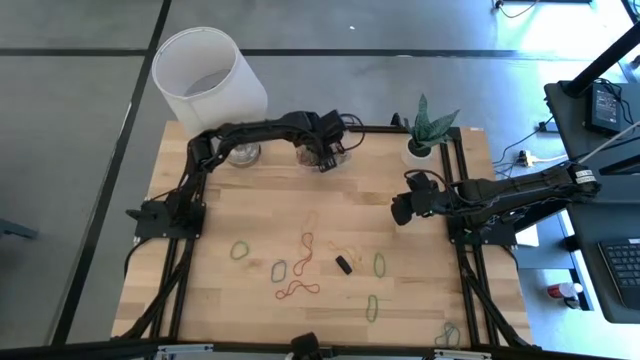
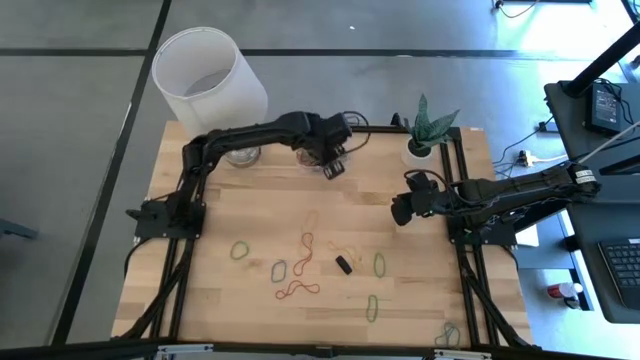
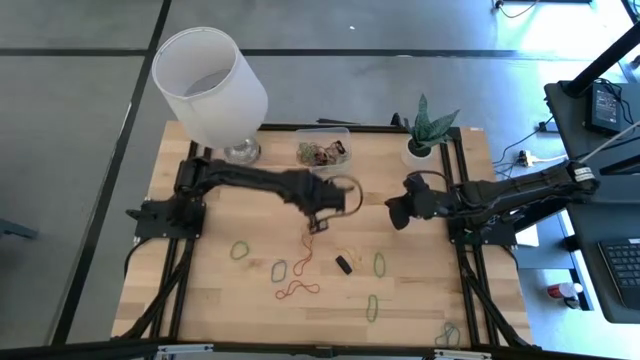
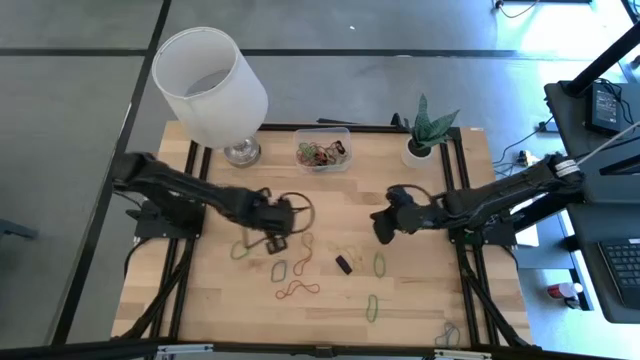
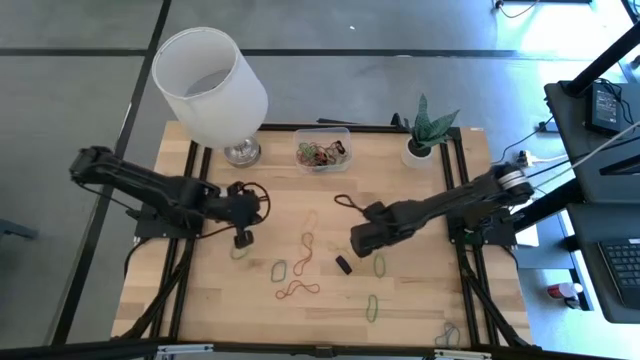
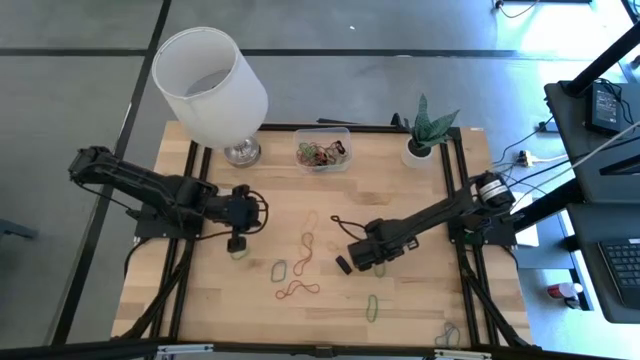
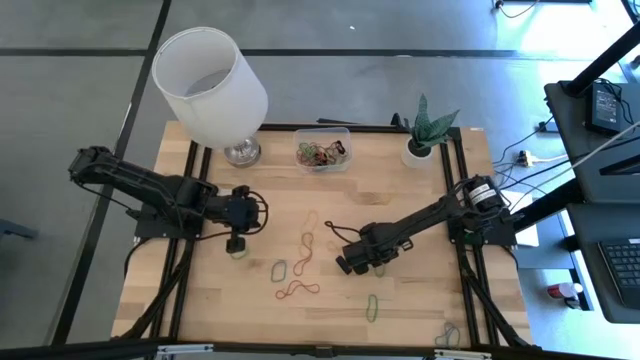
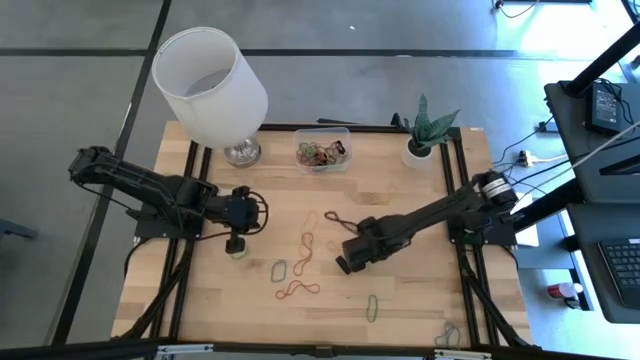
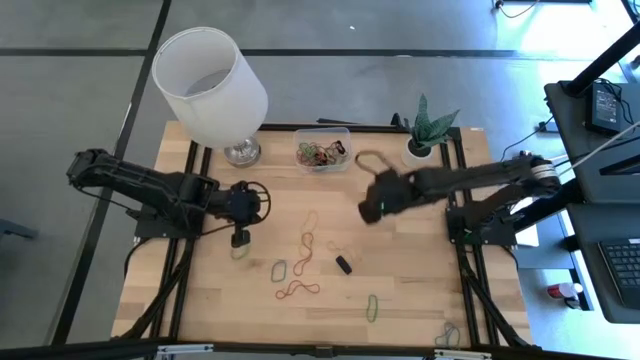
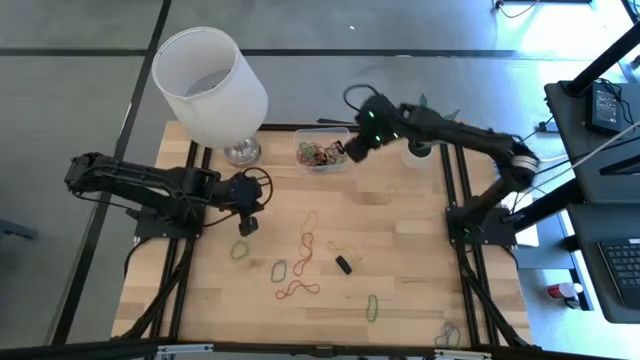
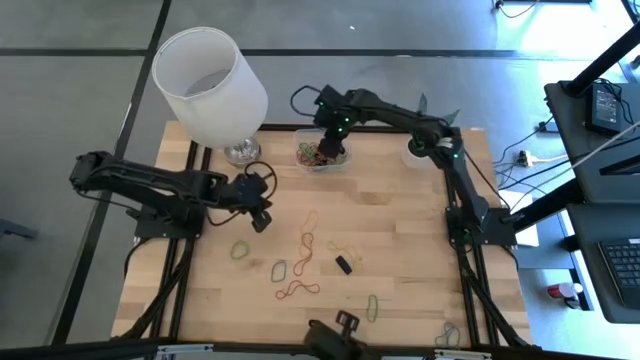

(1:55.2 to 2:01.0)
Task: Pick and place rubber bands into bin
Put the middle right green rubber band into the transparent bin

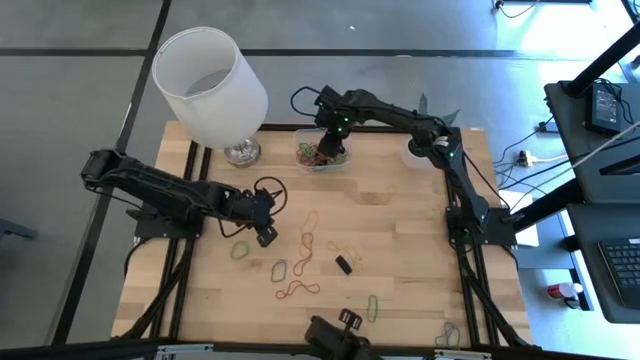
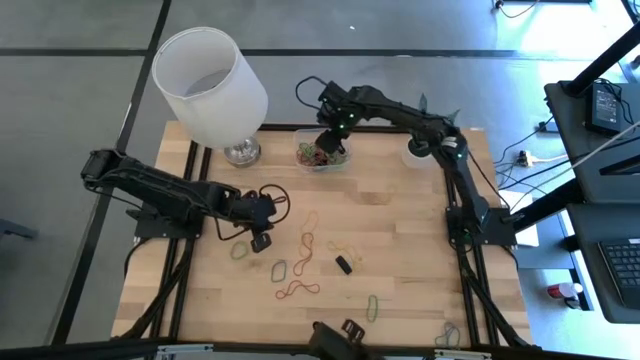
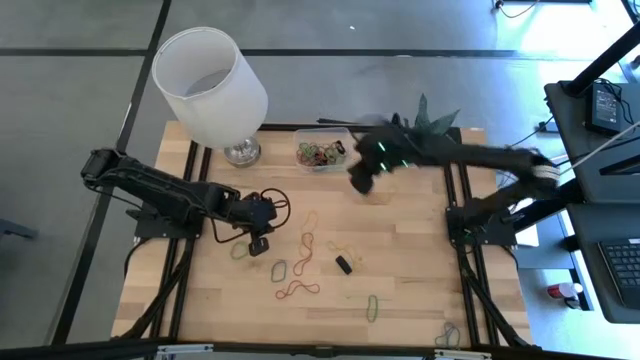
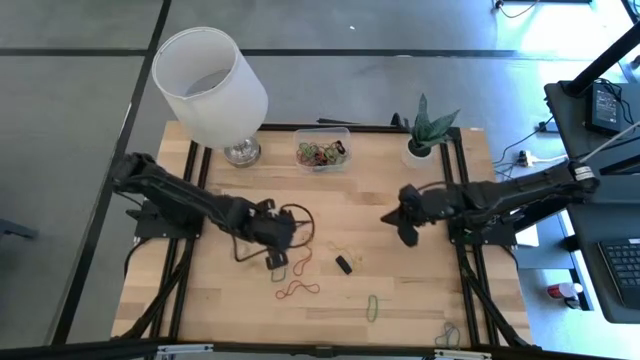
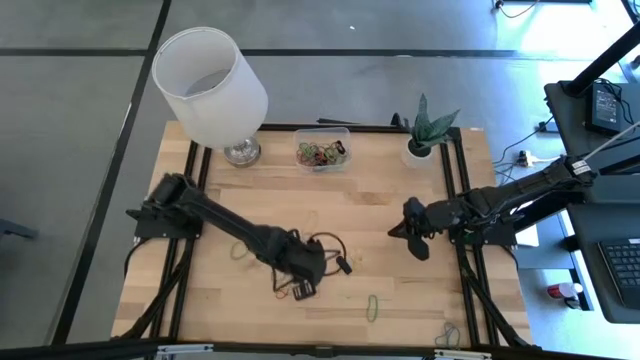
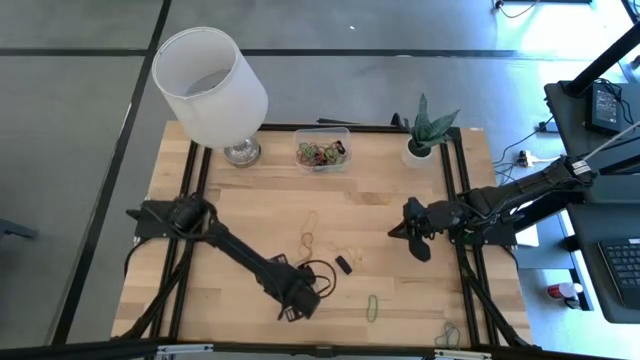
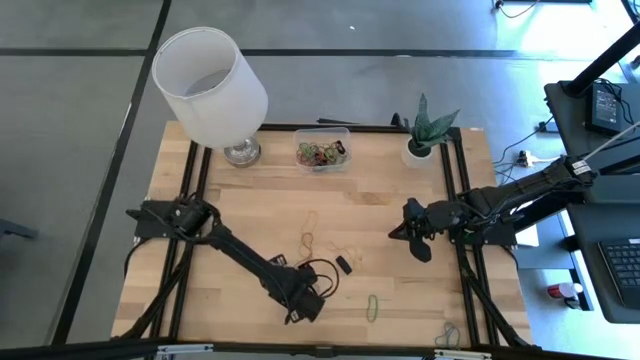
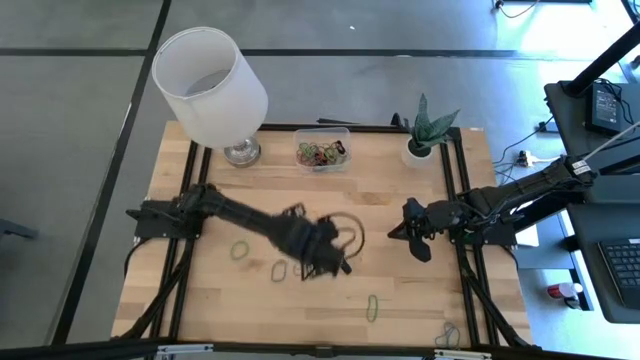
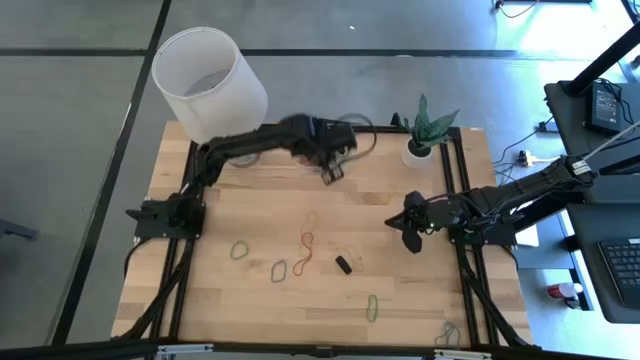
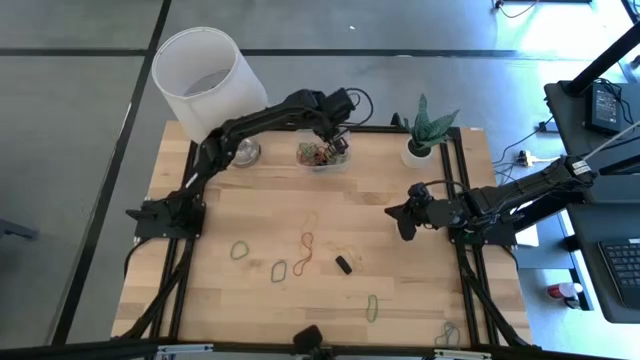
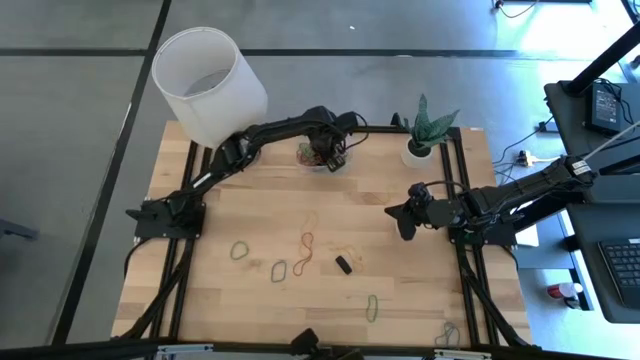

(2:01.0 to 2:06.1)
Put the bottom red rubber band into the transparent bin

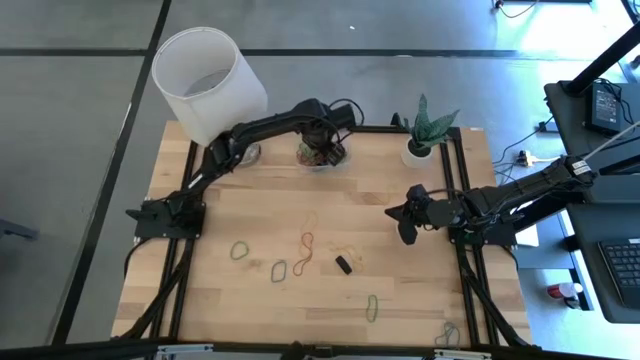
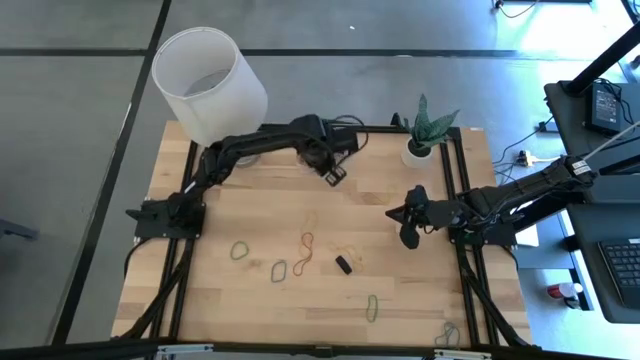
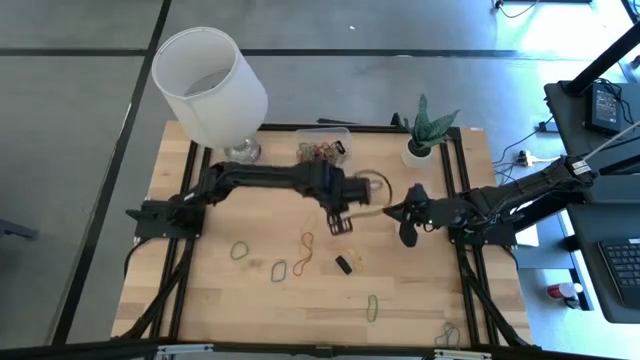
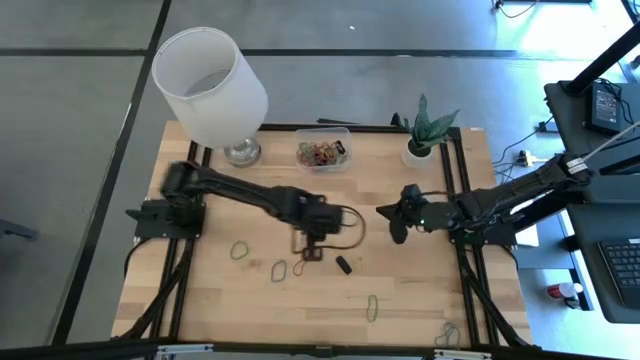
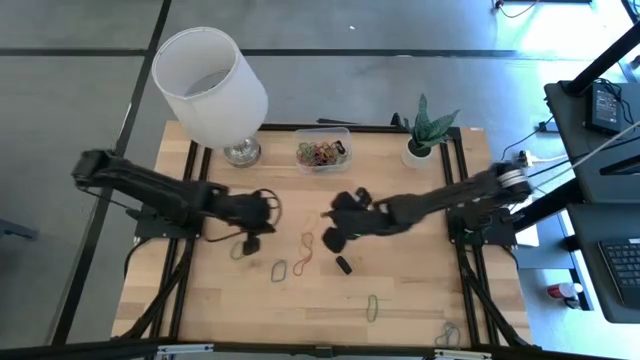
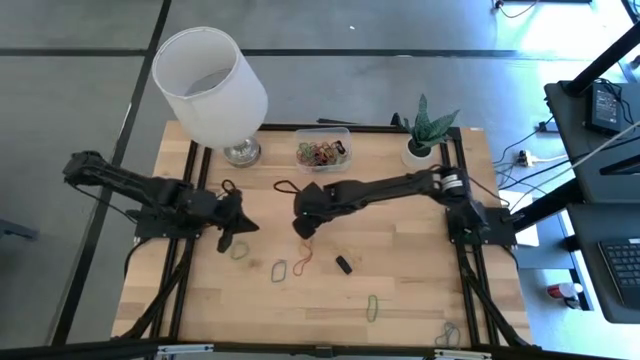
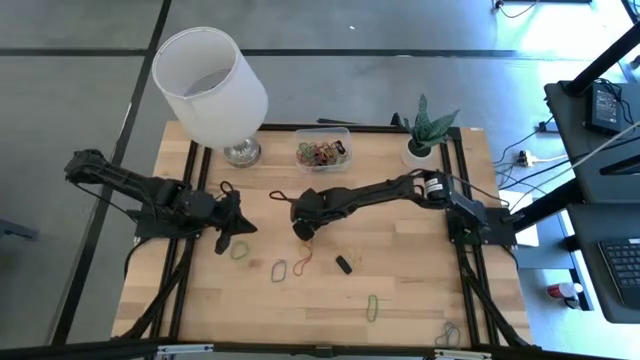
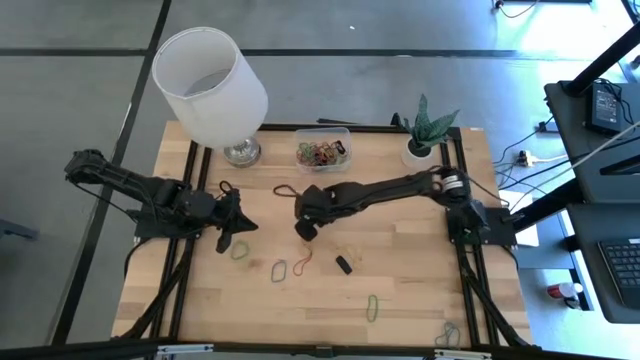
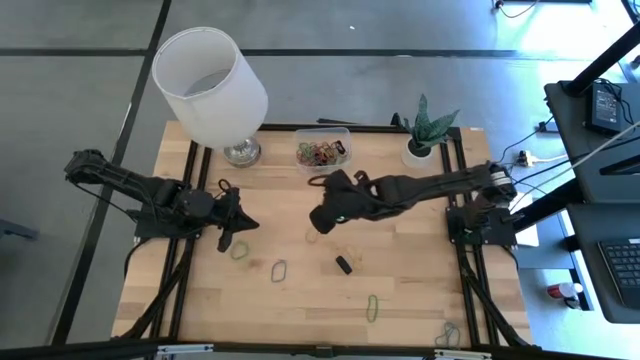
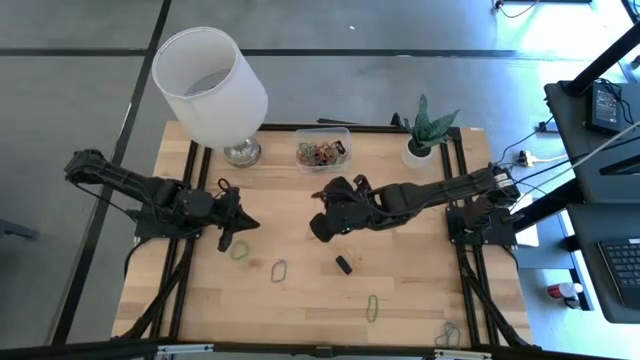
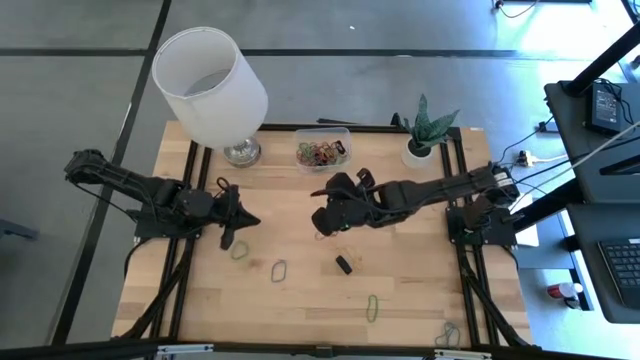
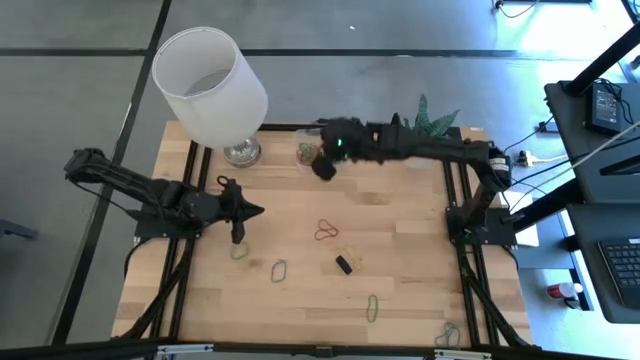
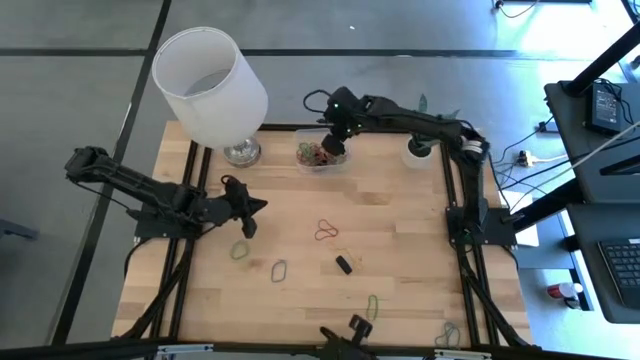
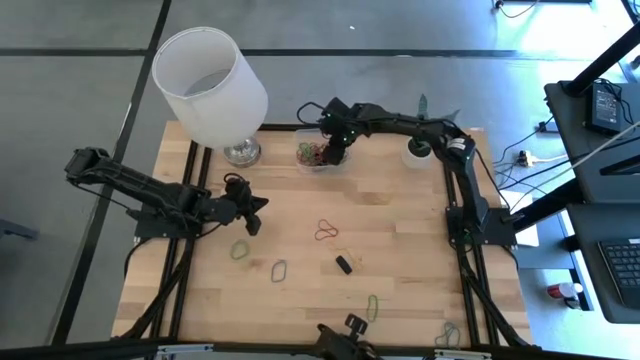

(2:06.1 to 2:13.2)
Put the top yellow rubber band into the transparent bin

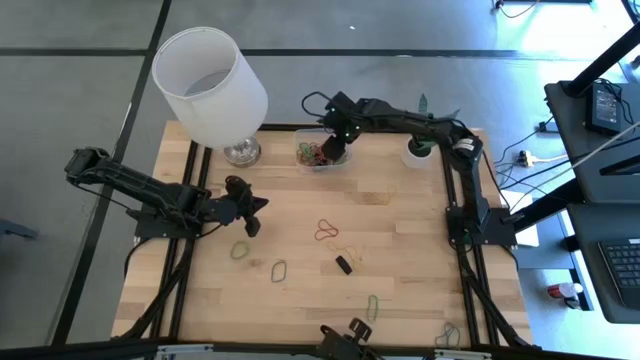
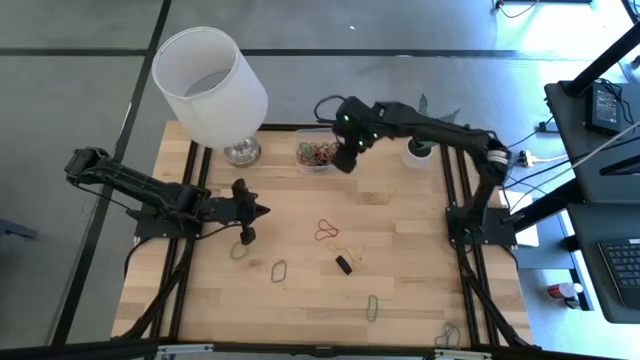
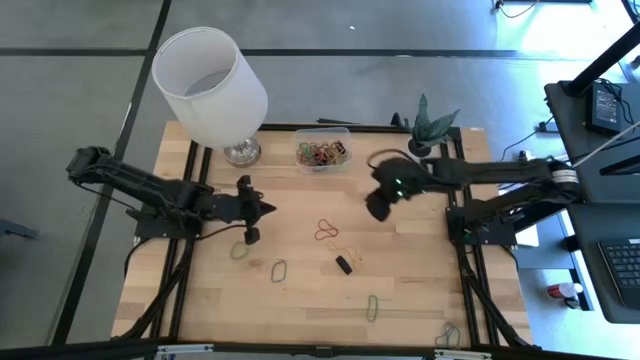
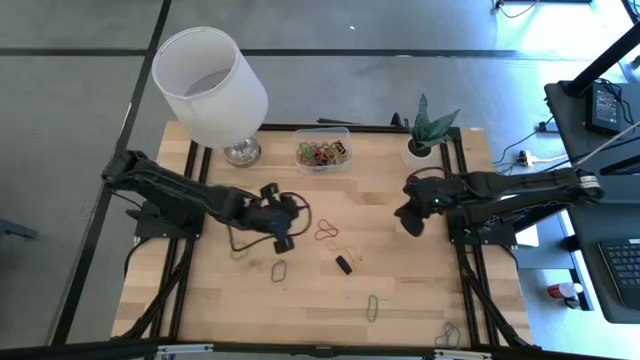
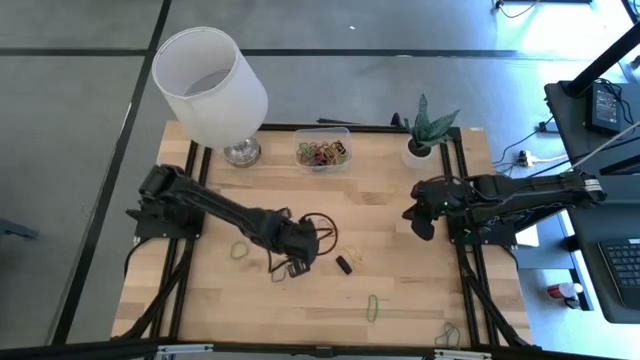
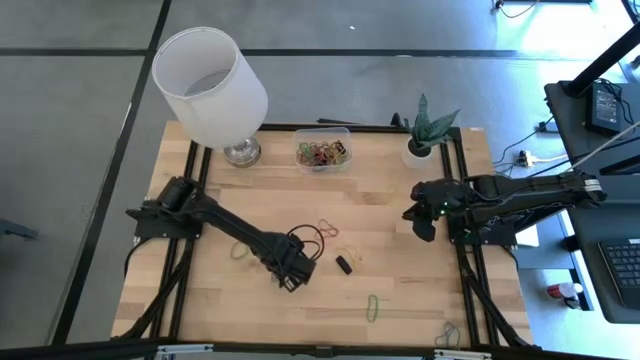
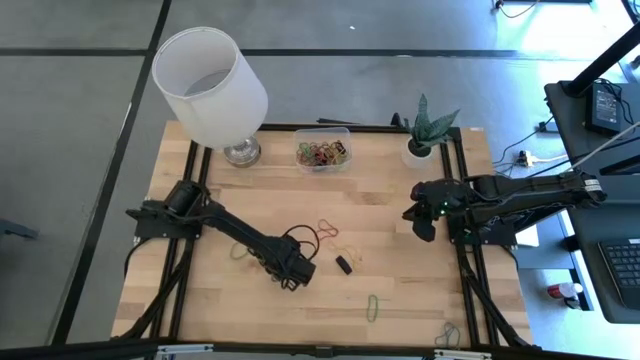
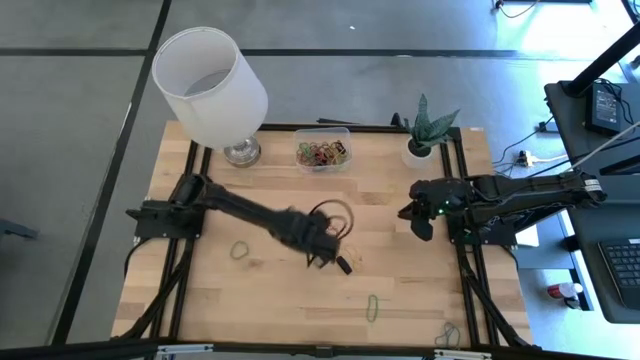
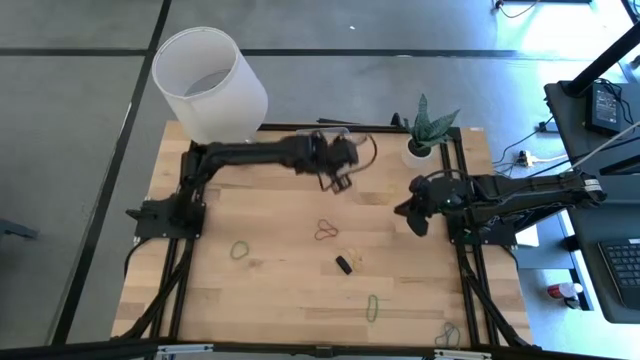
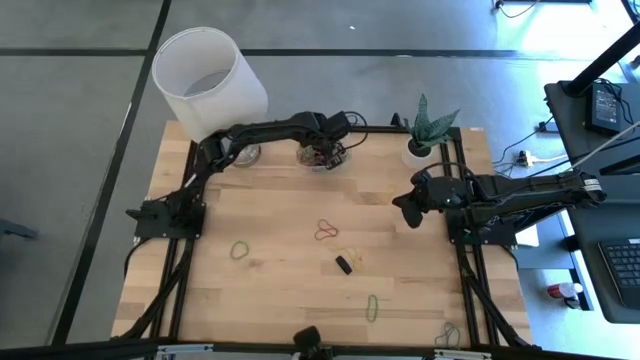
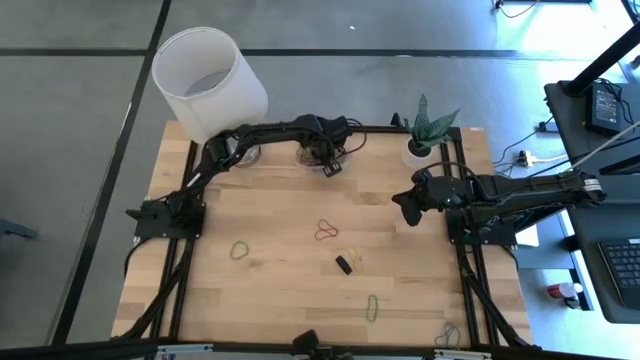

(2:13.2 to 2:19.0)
Put the top blue rubber band into the transparent bin
